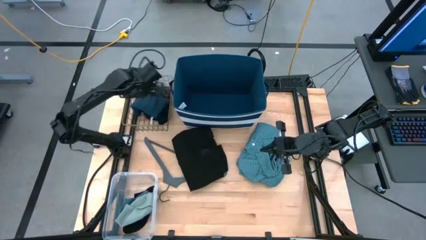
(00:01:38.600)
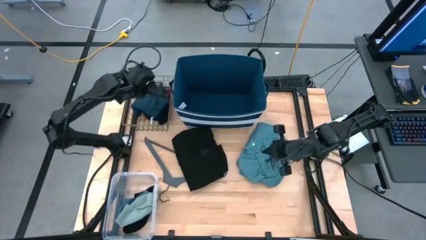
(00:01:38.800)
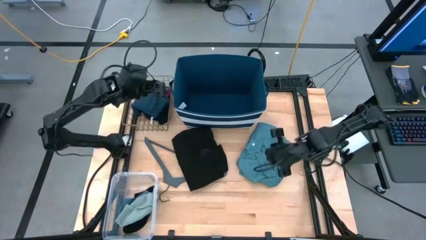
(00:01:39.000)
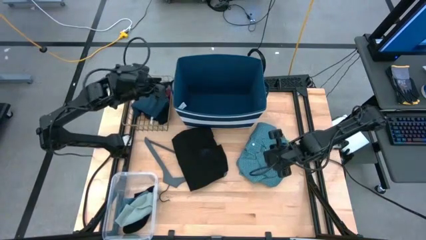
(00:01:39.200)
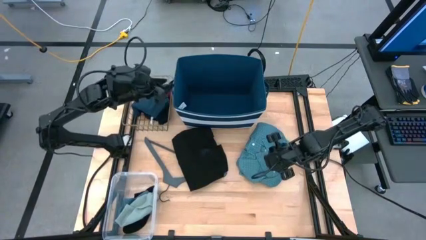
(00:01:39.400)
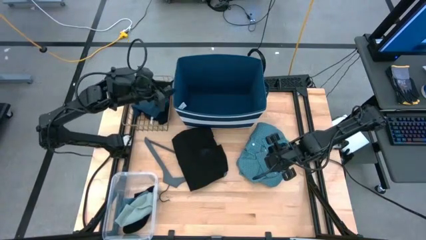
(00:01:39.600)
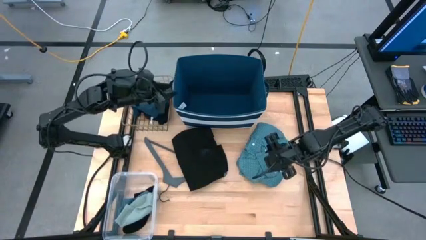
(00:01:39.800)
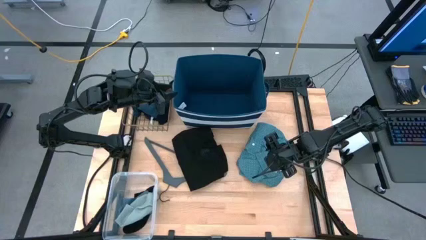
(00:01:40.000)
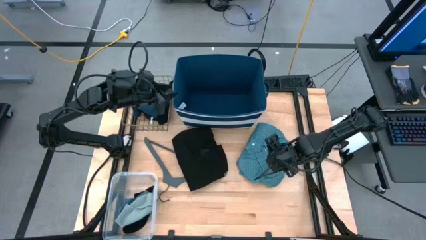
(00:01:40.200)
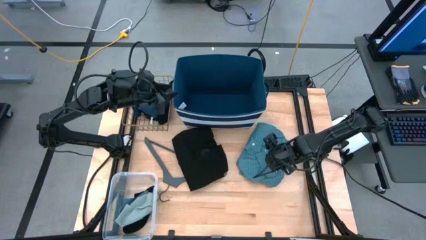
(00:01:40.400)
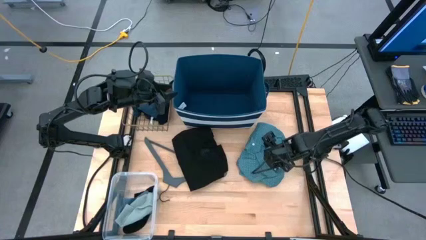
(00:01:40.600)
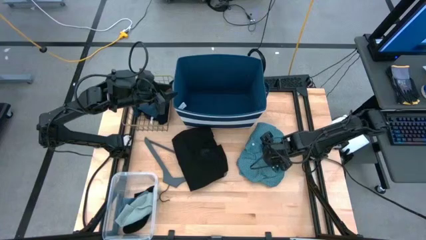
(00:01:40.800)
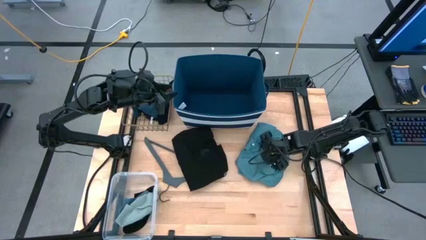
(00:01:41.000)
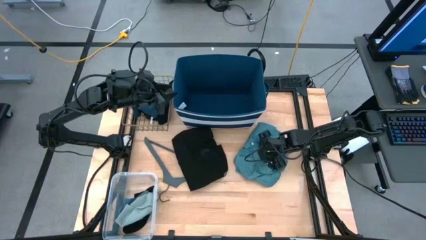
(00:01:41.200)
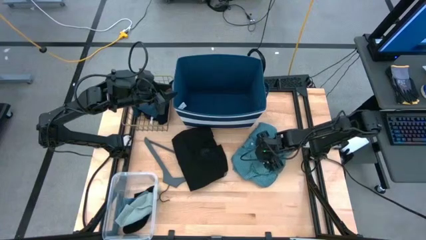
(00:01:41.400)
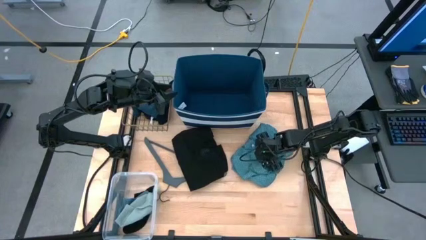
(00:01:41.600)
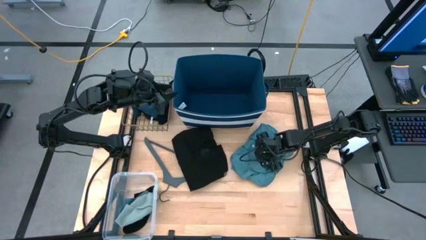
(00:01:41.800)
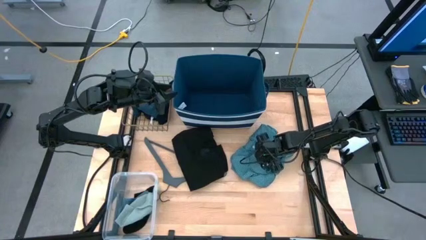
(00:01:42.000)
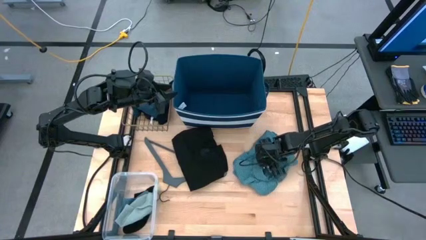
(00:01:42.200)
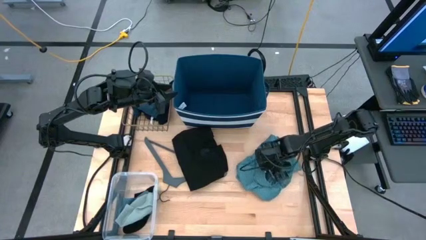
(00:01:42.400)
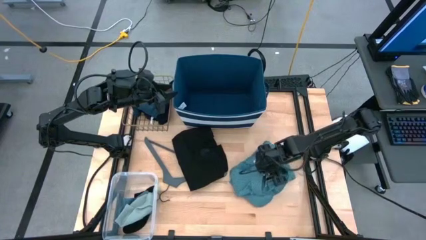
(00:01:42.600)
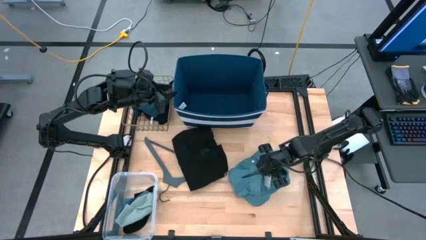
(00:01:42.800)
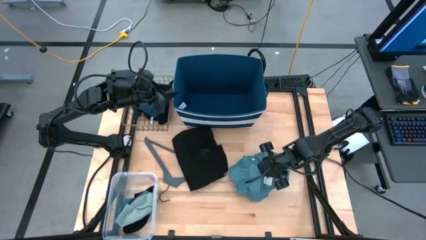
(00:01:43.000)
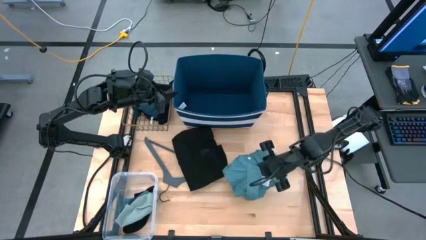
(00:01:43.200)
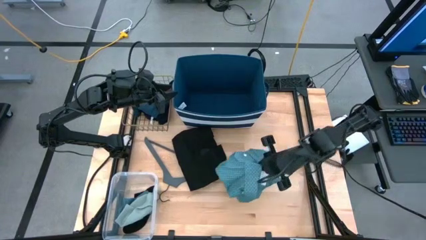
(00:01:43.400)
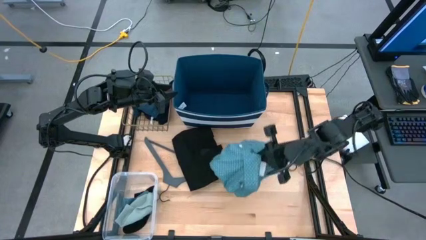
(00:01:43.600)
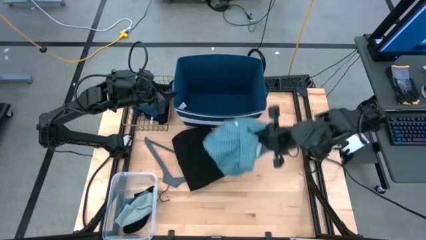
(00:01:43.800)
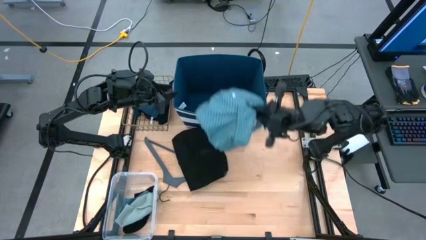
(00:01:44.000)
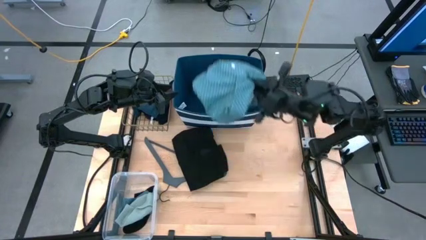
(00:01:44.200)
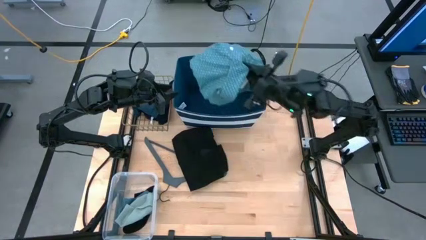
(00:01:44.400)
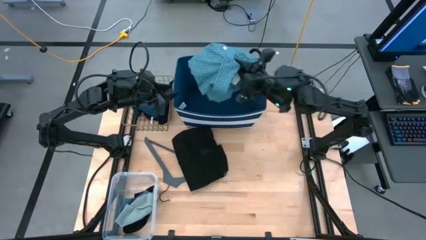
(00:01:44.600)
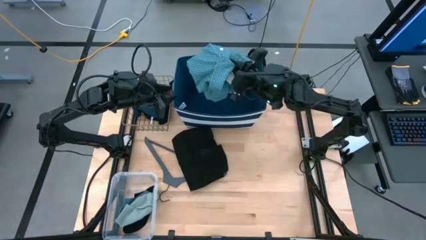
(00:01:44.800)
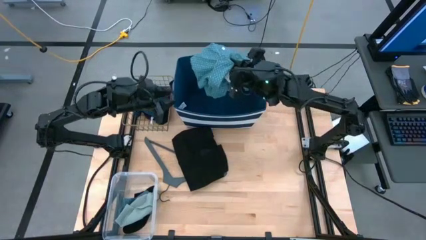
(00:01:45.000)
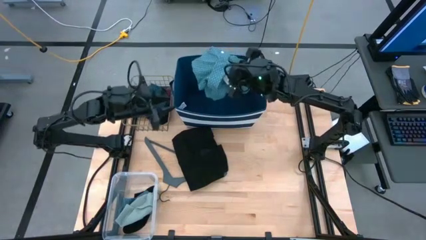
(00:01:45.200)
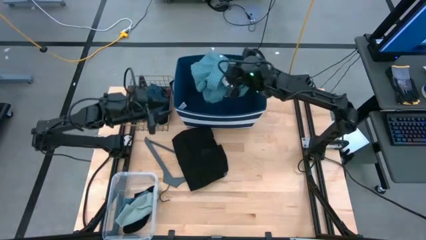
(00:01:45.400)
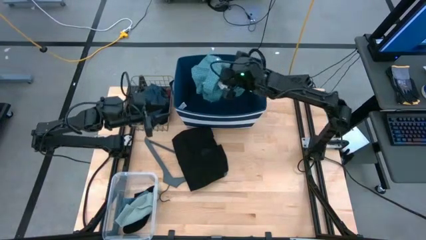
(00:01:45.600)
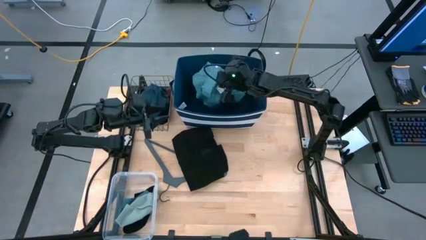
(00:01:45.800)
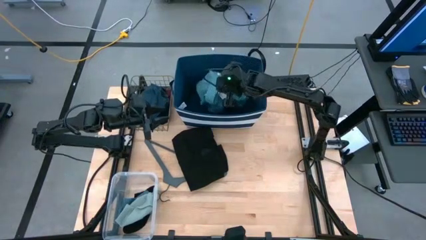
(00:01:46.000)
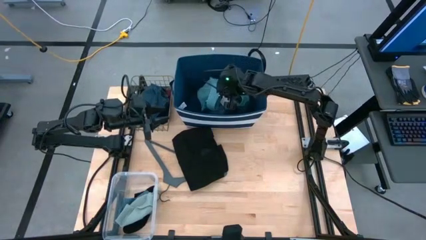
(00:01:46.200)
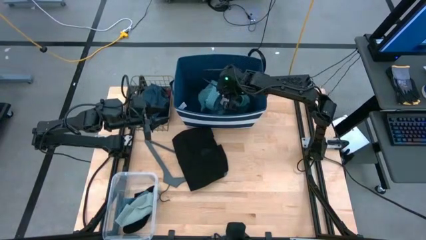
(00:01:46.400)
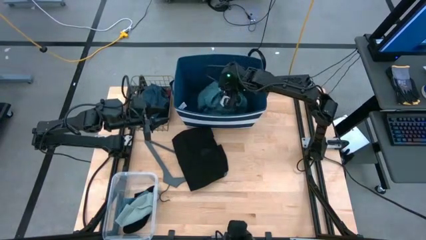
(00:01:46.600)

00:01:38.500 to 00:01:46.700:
Task: Pick & Place Cloths
Put the blue shirt into the blue laundry organizer

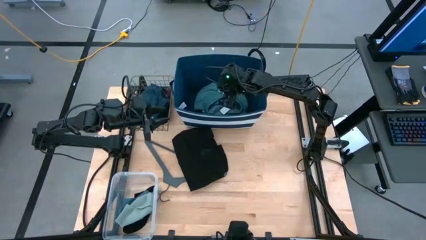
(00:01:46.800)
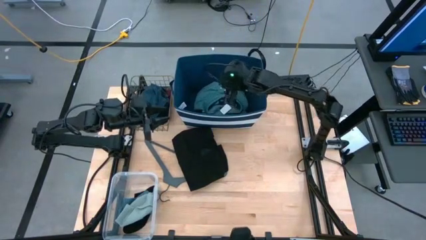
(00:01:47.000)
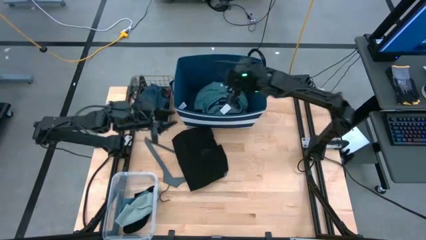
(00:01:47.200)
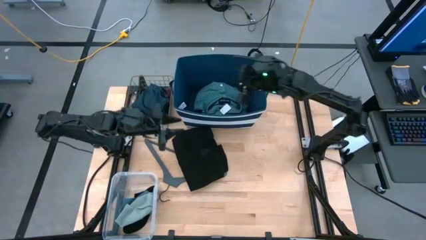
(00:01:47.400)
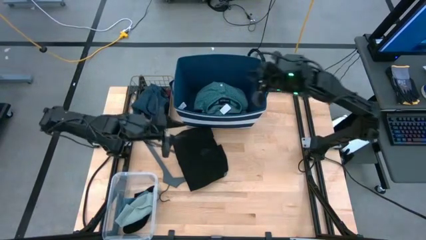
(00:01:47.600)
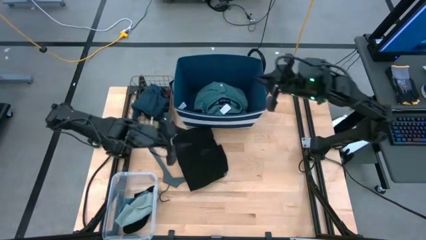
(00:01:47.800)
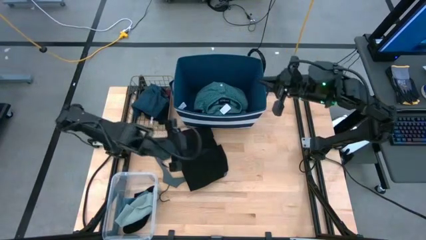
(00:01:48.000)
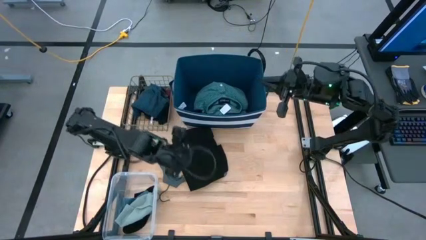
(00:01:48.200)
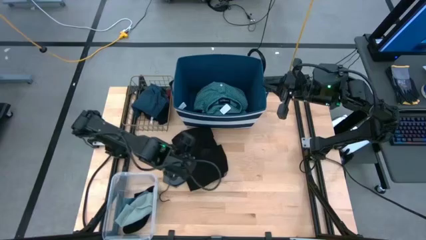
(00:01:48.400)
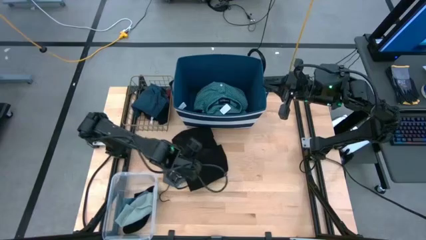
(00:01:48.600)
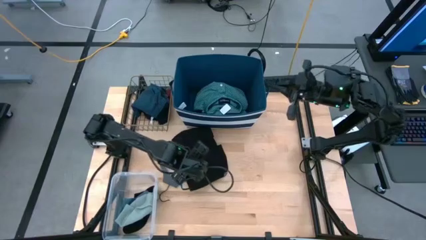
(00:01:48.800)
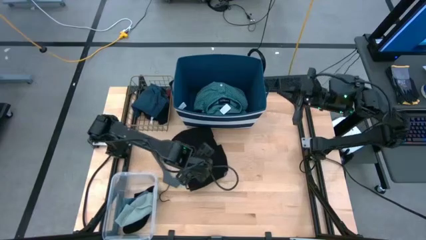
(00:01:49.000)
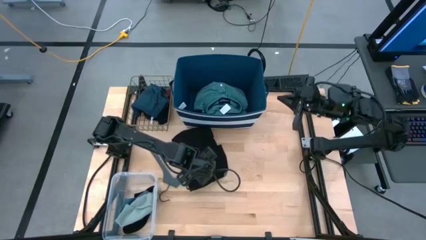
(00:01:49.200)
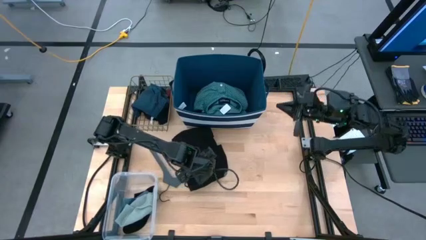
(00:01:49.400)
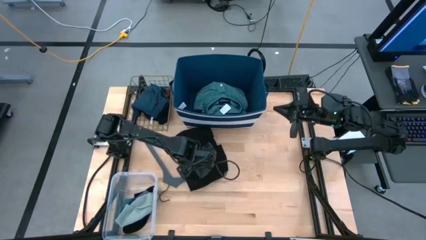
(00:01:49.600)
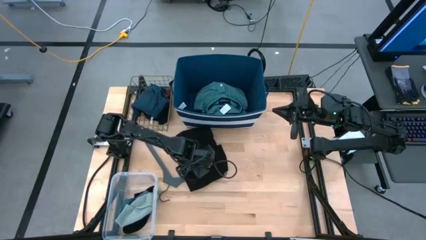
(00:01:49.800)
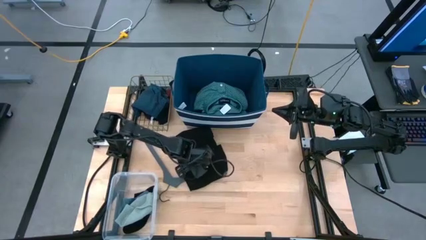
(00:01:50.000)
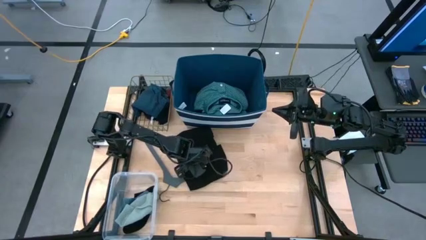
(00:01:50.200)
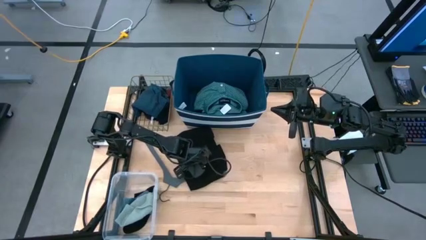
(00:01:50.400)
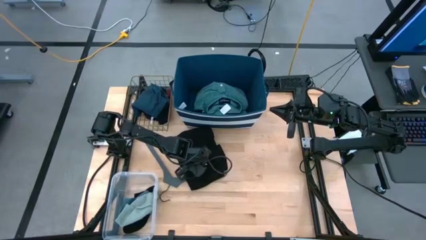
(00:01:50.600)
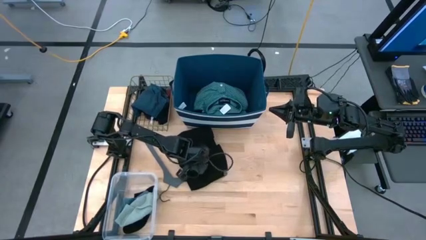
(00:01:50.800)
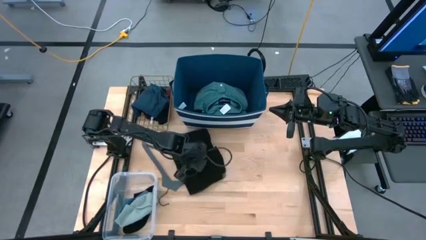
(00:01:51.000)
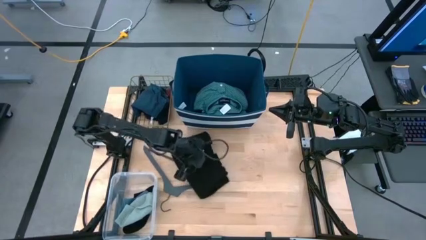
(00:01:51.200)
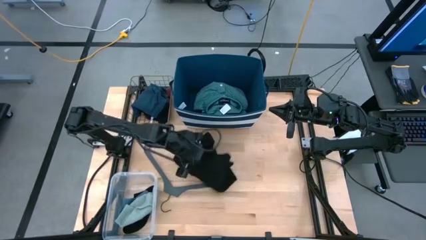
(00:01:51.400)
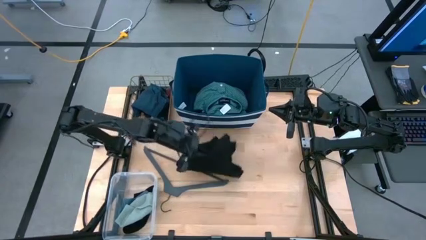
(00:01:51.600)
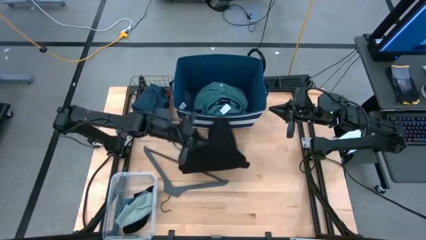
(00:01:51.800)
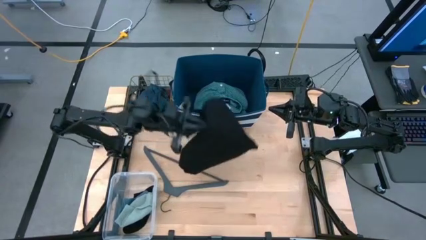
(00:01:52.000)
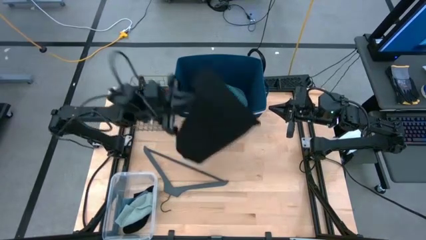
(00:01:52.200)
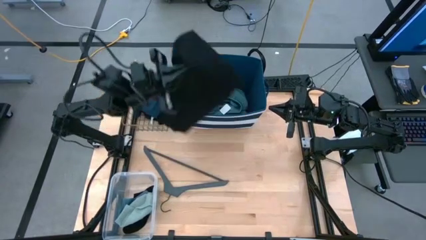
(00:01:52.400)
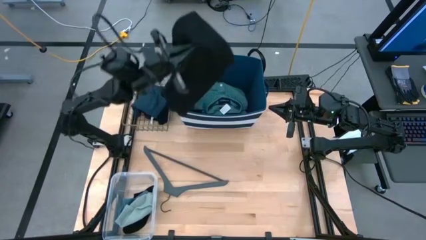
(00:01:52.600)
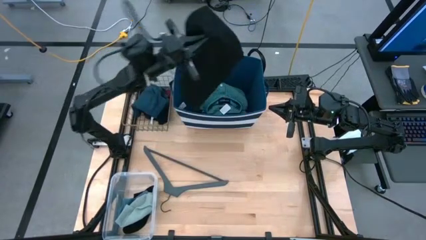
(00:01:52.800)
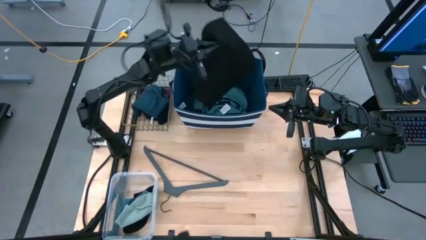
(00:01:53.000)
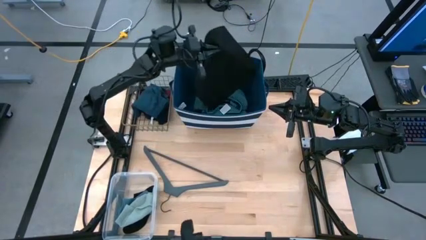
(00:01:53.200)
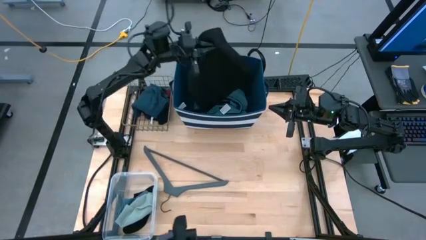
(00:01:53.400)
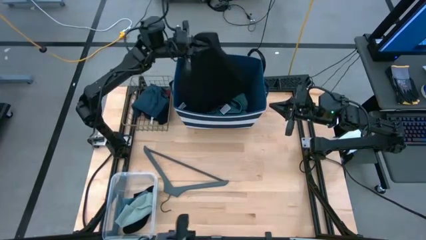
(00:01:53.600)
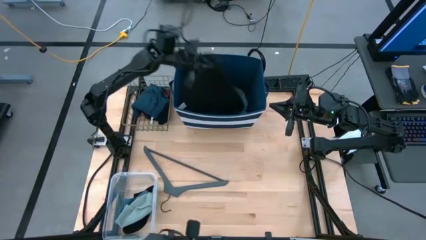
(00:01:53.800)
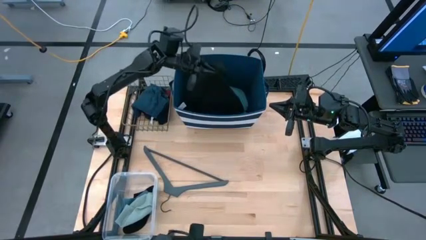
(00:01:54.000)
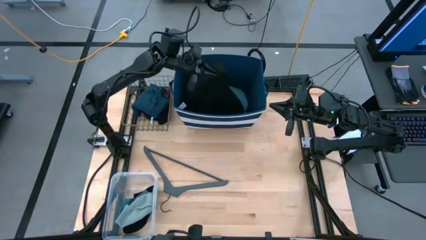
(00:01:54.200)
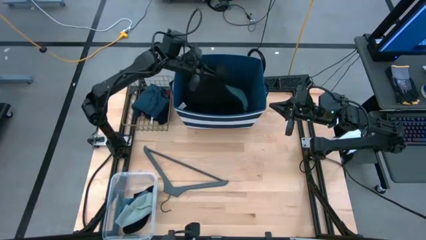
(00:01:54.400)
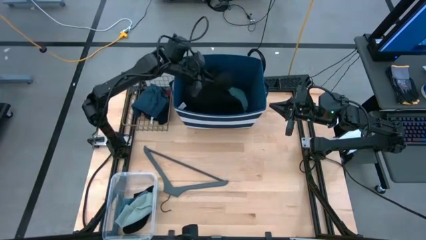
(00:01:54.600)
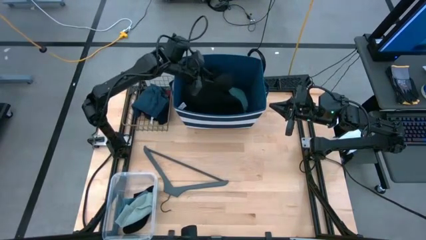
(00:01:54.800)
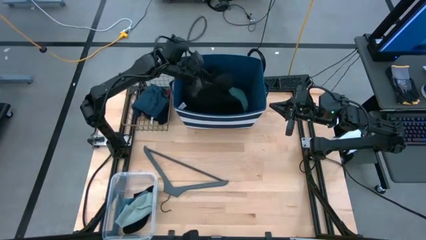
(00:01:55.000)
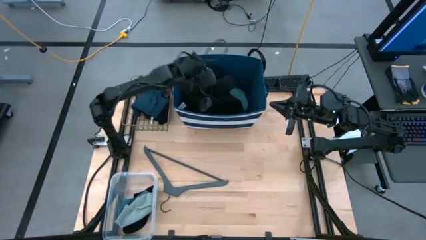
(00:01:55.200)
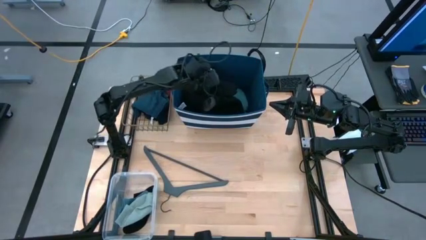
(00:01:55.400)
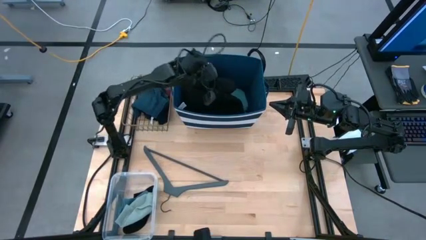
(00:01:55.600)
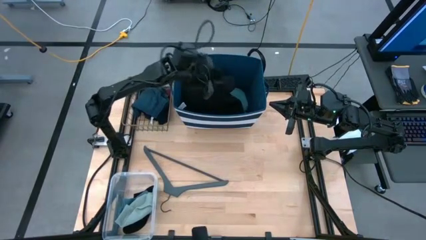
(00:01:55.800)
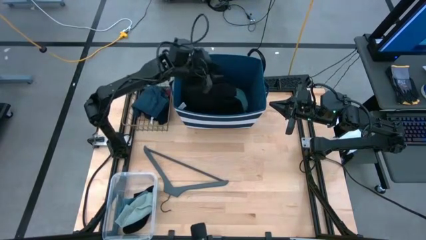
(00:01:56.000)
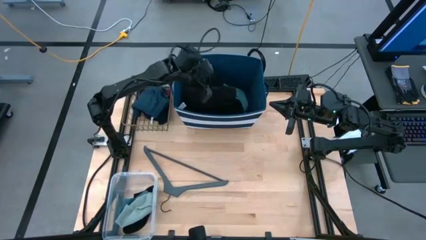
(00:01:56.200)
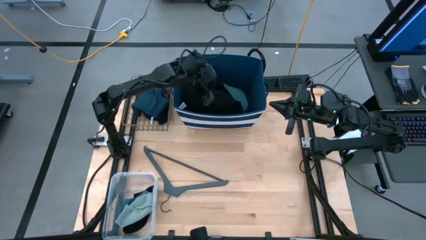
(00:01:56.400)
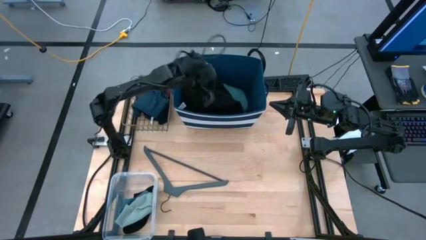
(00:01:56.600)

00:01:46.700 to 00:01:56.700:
Put the black shirt into the blue laundry organizer
